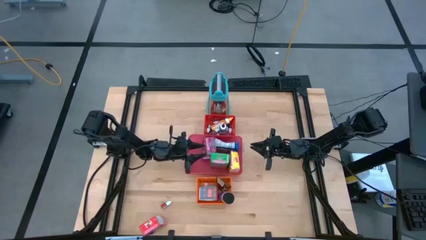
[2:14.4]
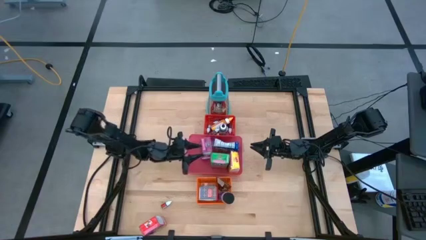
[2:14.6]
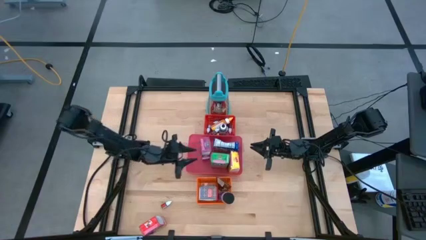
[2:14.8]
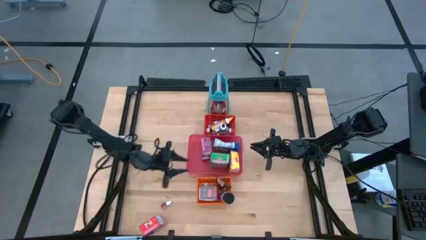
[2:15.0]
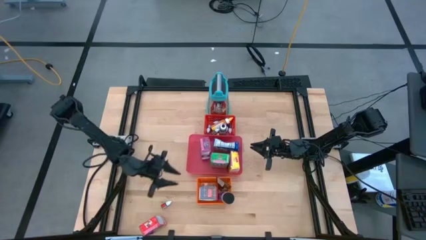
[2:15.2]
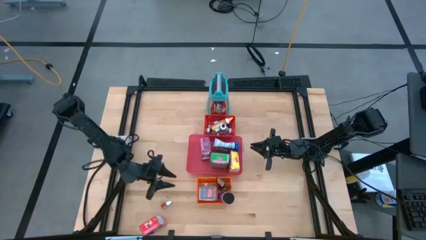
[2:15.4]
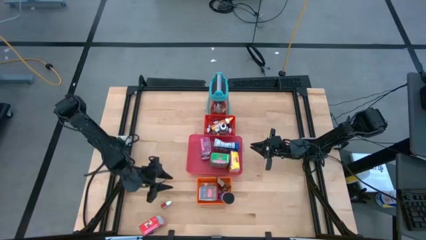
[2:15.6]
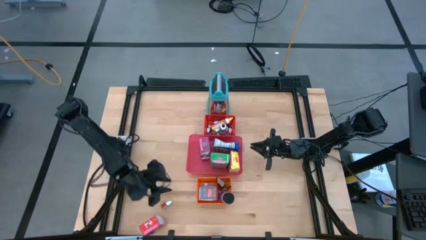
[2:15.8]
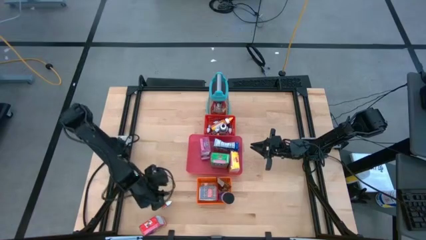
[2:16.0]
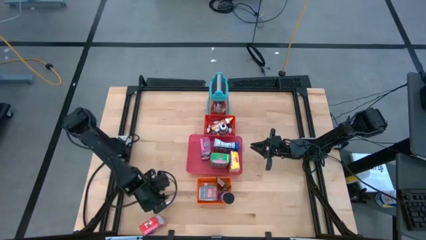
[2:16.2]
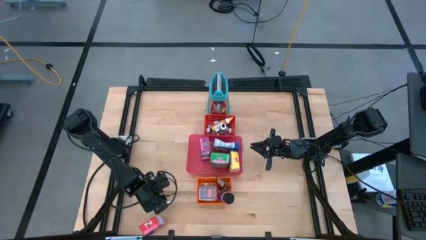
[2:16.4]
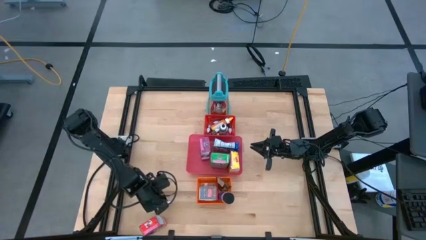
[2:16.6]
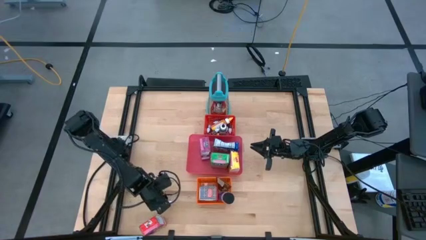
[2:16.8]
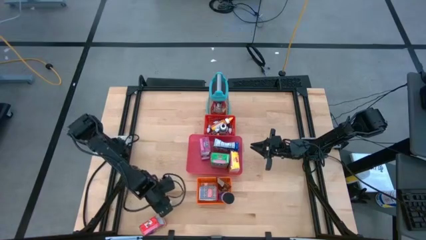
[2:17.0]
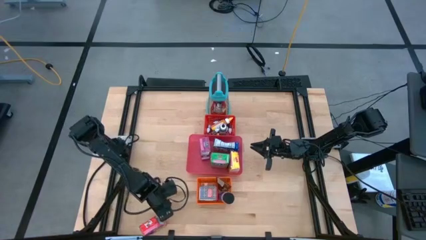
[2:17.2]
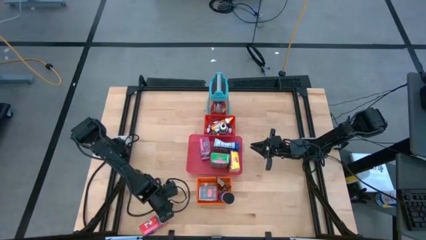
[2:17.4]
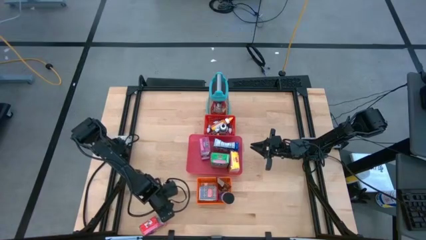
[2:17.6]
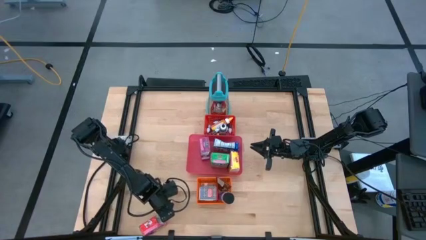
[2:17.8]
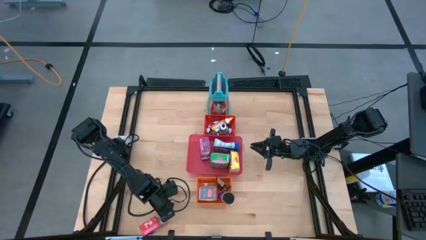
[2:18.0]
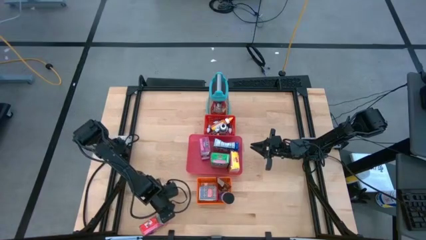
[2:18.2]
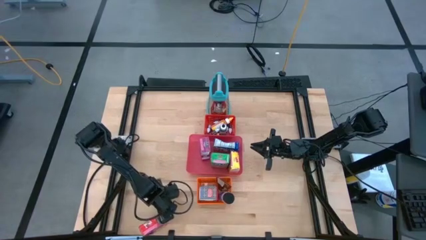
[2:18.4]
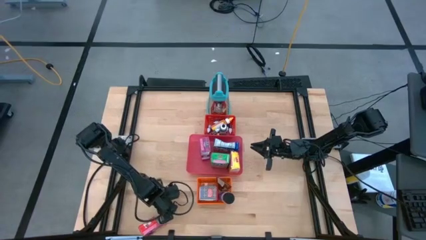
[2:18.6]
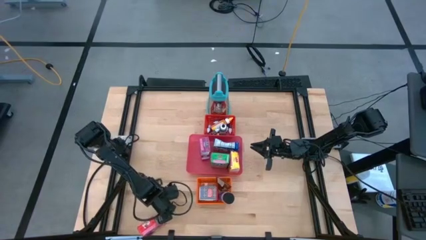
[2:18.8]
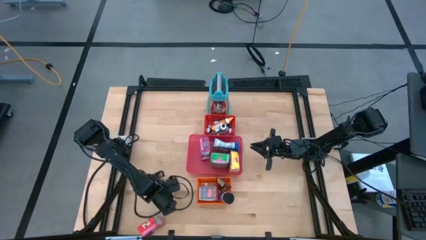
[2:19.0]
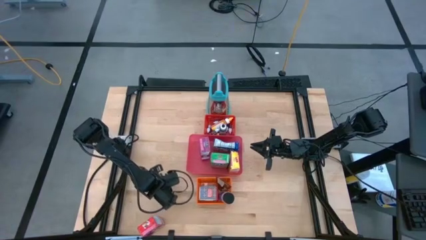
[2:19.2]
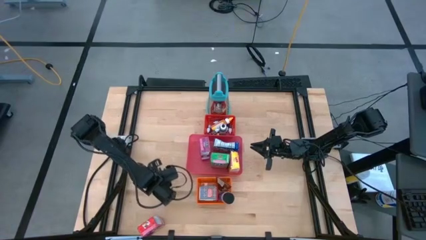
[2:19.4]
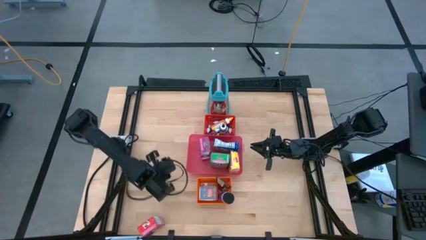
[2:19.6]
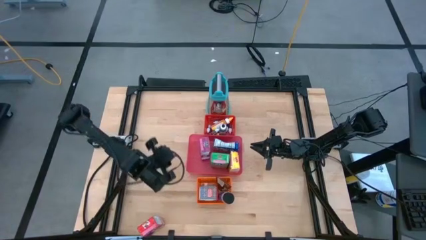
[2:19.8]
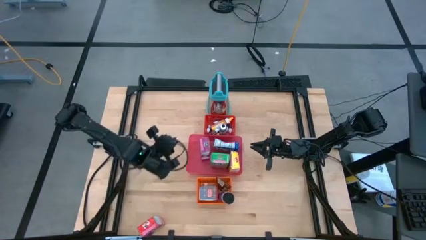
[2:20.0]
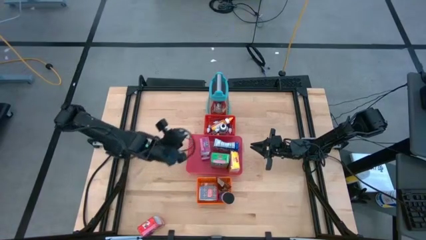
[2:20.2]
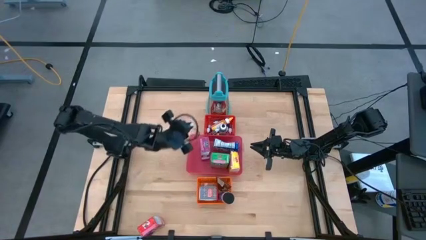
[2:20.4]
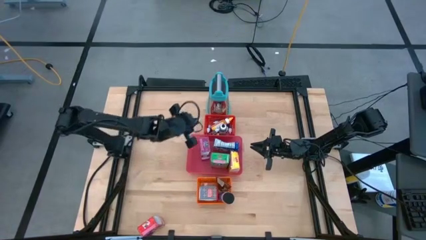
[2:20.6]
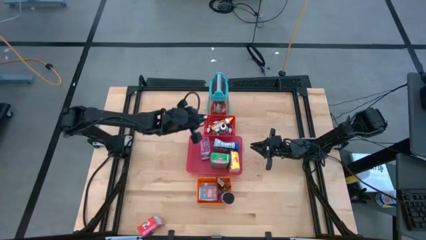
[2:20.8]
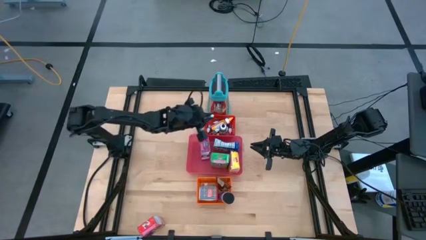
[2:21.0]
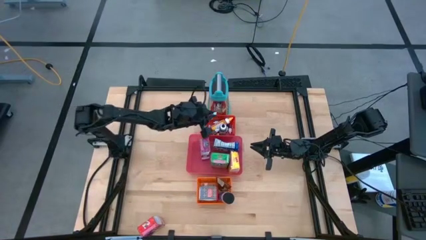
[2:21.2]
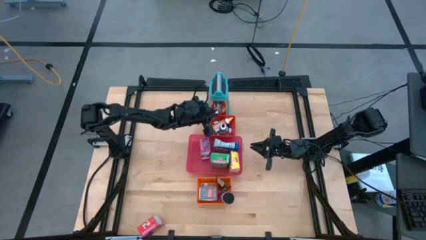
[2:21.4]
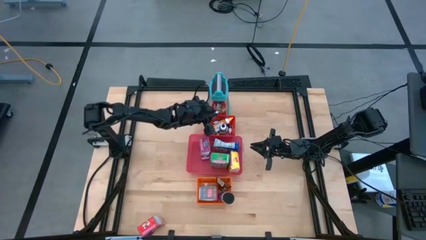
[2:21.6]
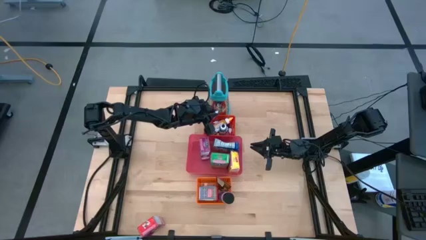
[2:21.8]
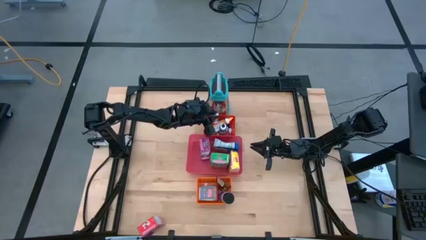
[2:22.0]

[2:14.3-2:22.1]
Task: Pick & Place Kitchen Items
Put the small red food coloring bottle into the red bin

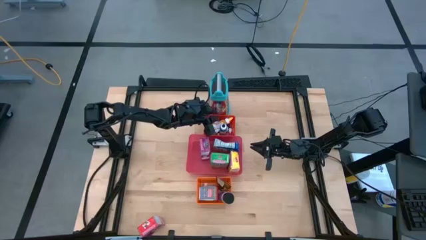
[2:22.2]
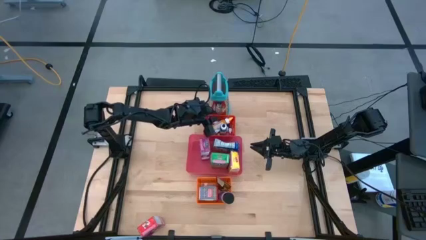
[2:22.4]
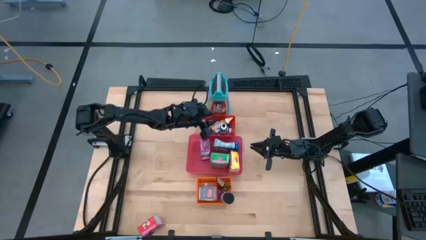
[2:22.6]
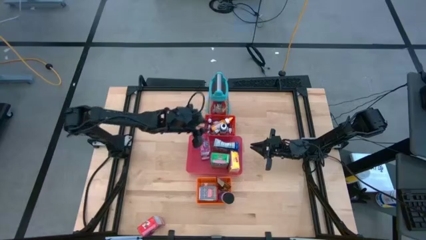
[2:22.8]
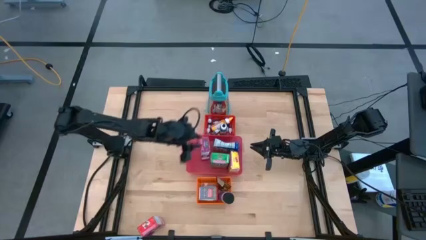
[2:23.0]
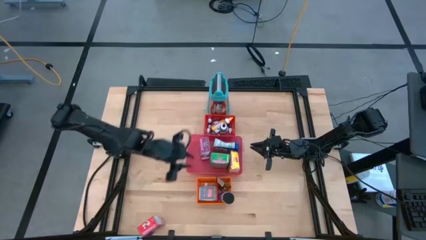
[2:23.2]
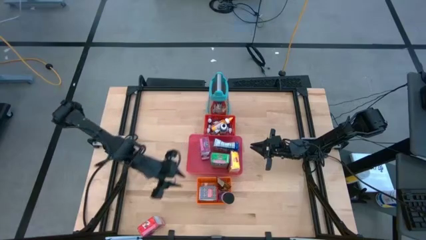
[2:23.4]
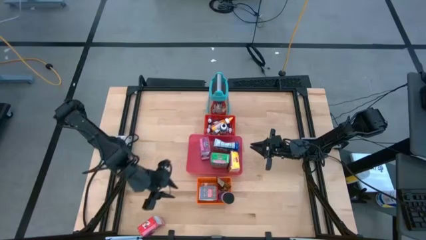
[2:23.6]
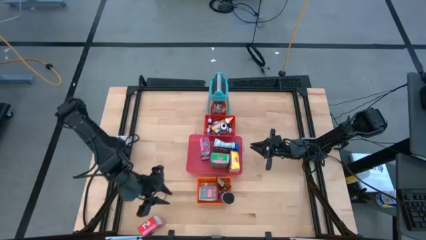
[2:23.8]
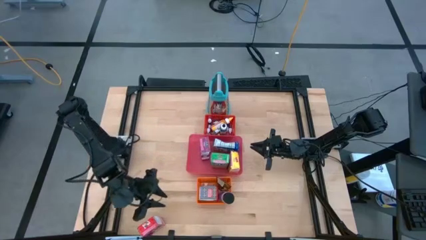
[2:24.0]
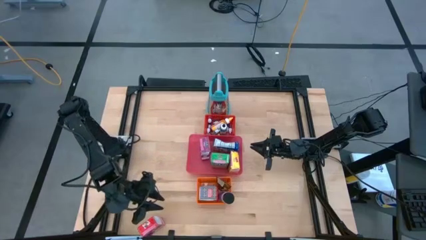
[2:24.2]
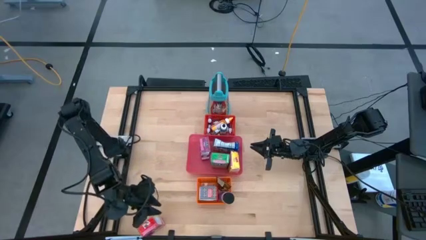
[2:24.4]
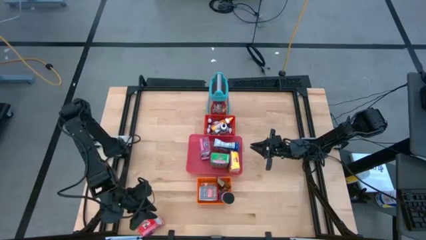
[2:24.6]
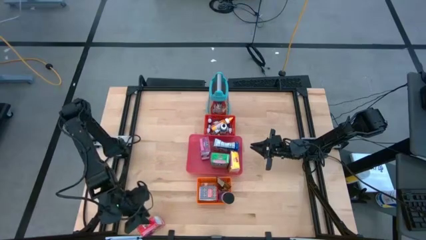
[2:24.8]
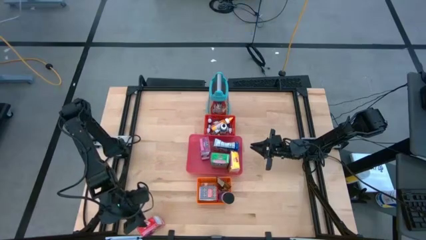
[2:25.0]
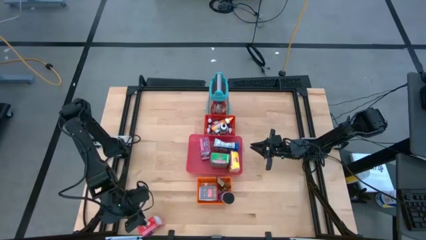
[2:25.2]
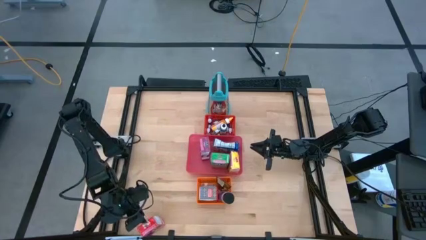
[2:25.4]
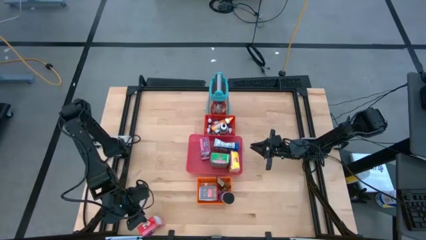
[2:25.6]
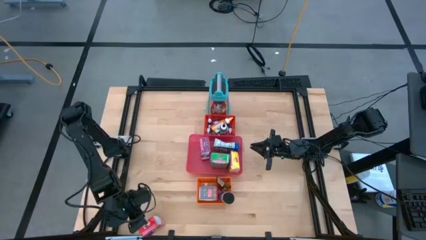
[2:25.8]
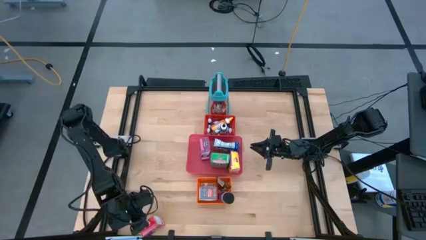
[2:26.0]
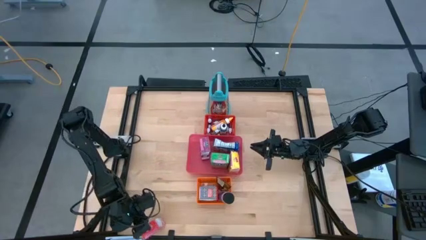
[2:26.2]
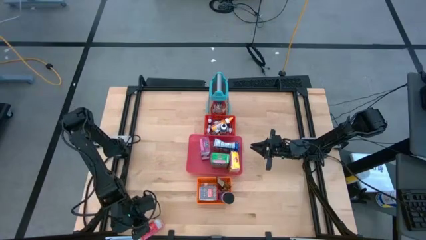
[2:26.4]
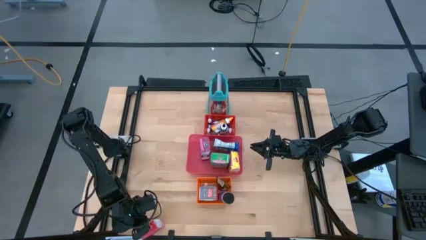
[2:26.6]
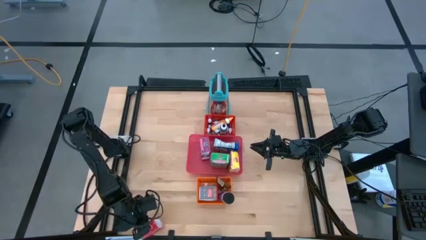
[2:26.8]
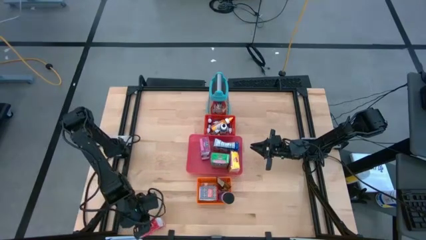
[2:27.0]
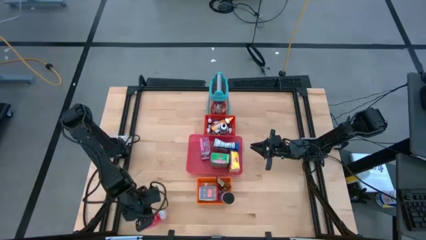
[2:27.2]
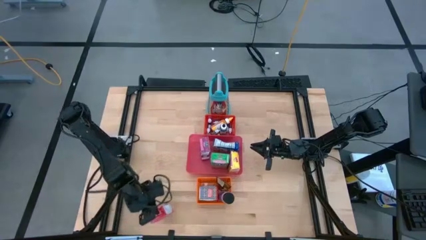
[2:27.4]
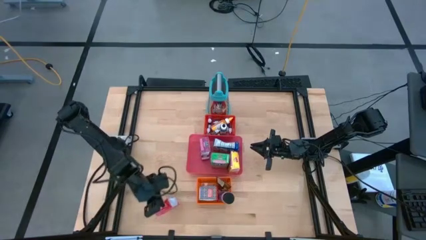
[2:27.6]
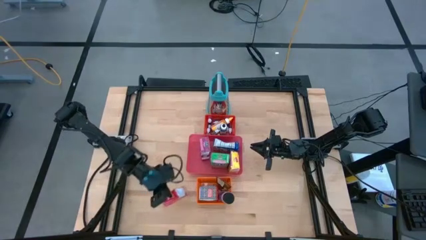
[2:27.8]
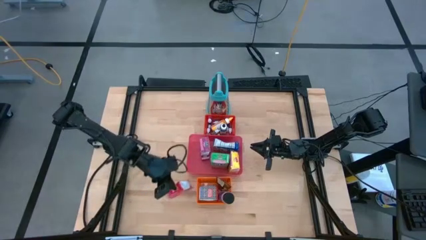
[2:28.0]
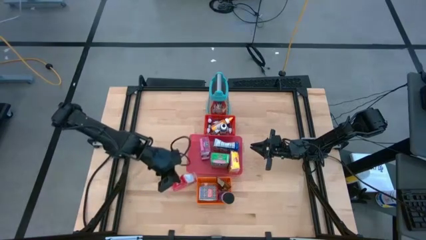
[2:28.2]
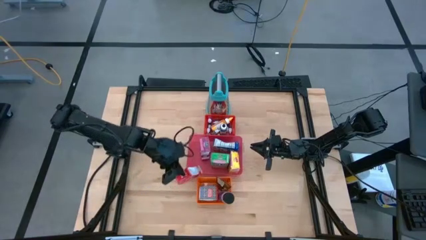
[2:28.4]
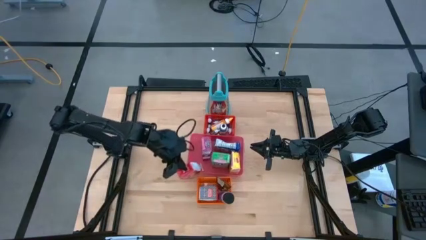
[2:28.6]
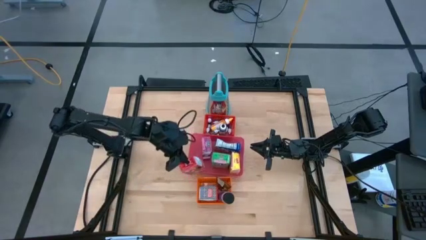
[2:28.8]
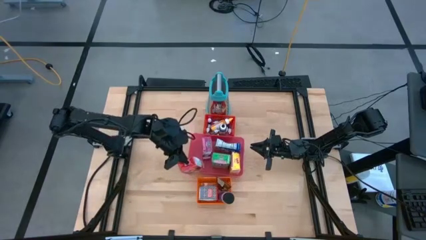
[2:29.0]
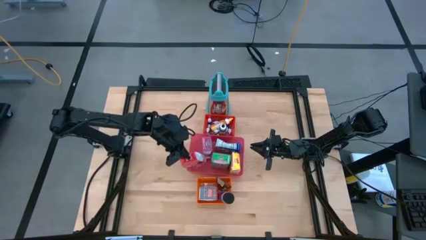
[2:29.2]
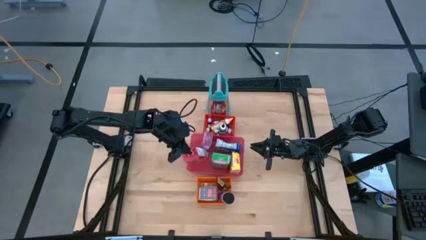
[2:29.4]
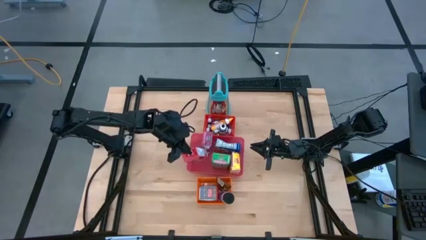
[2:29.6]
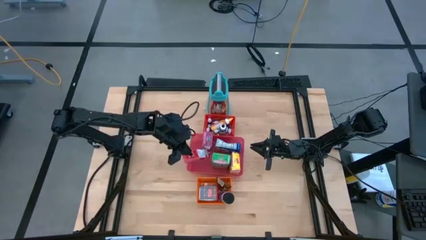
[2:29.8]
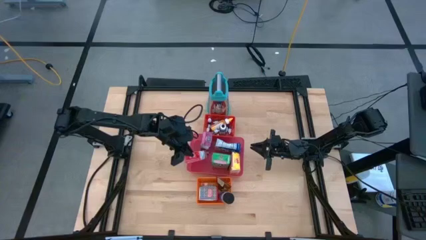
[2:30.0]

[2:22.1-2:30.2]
Put the red cereal box into the pink bin
